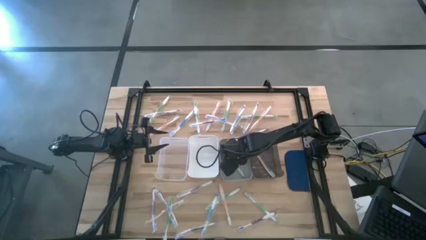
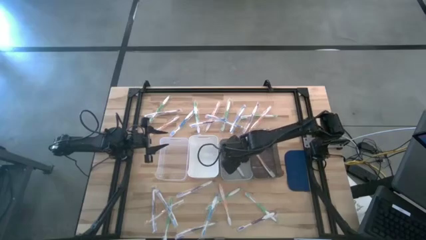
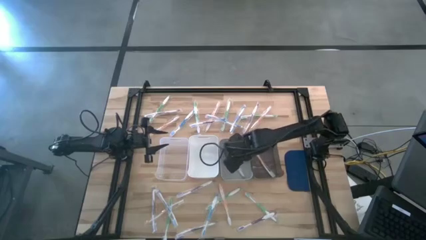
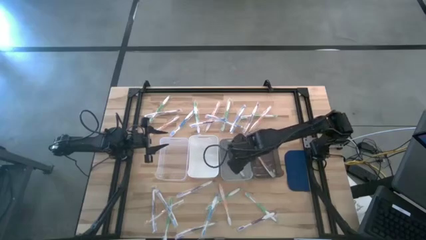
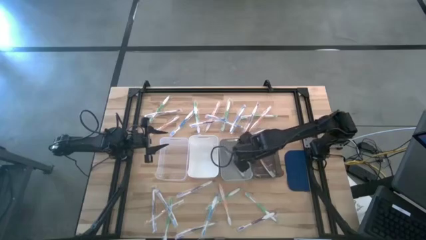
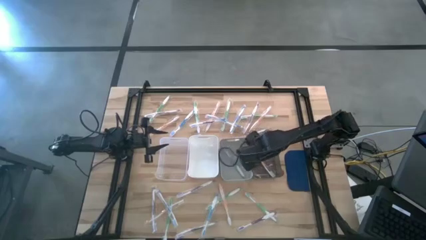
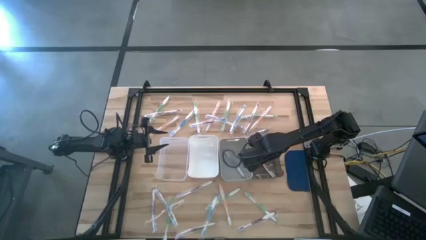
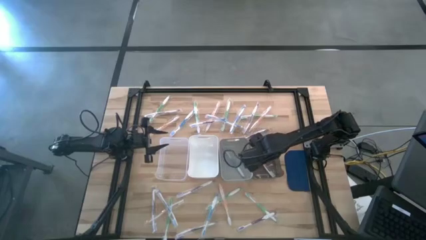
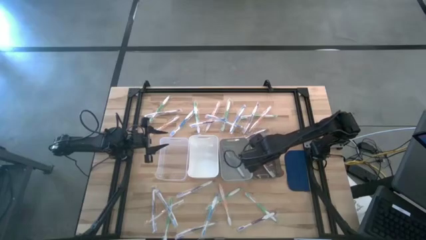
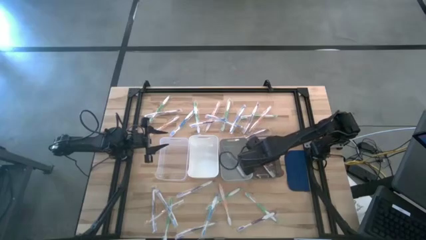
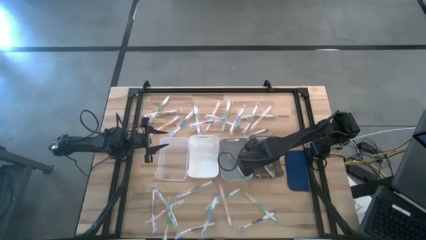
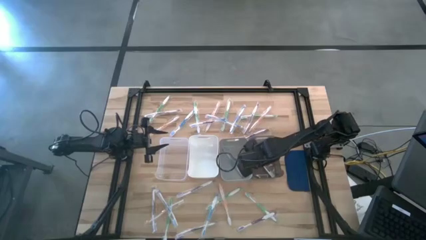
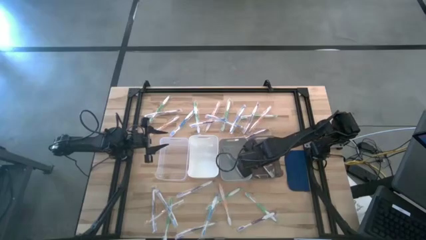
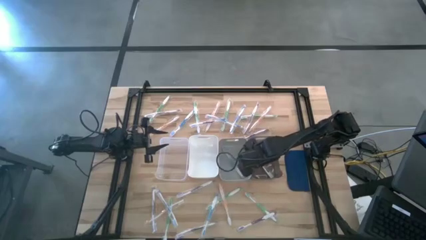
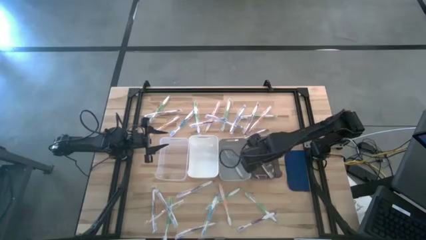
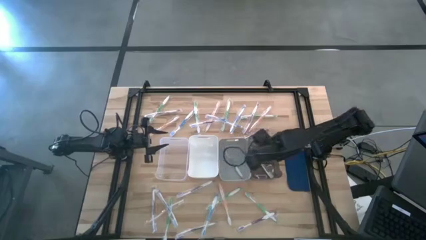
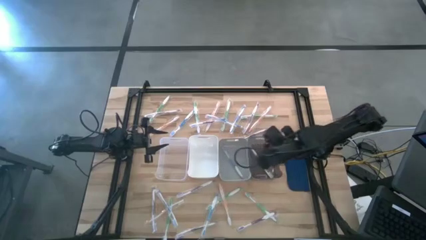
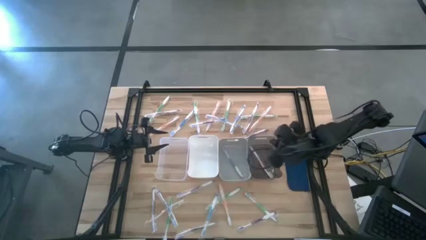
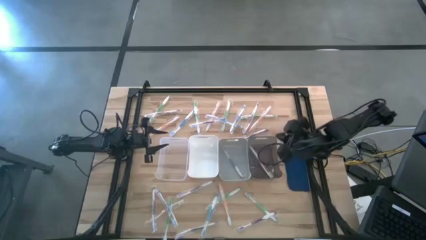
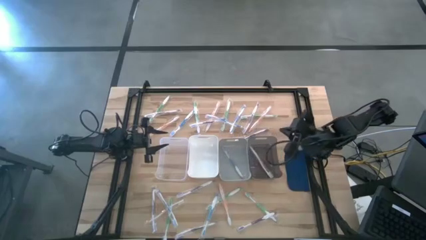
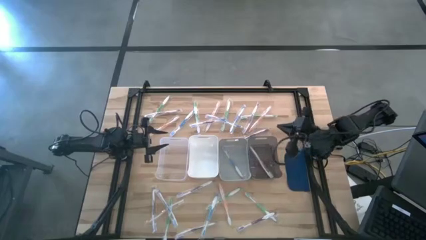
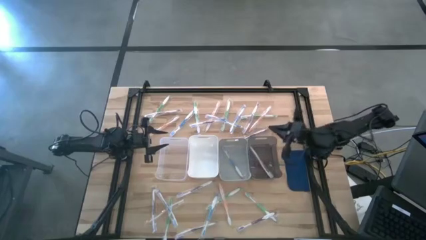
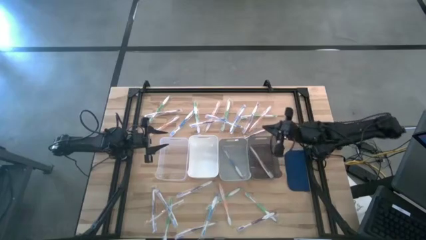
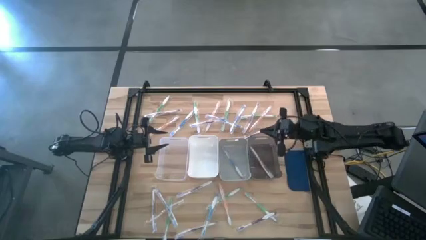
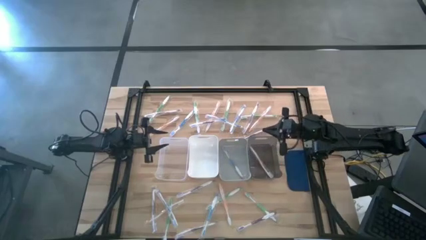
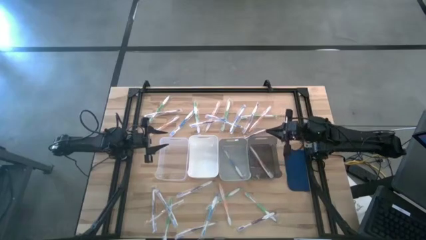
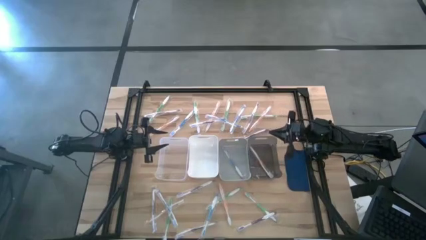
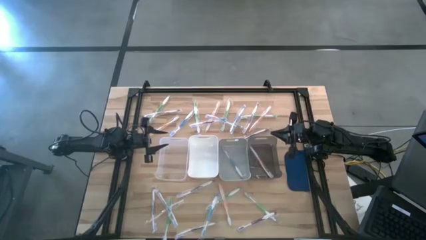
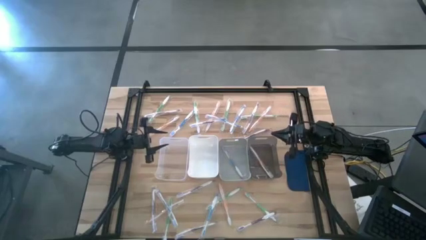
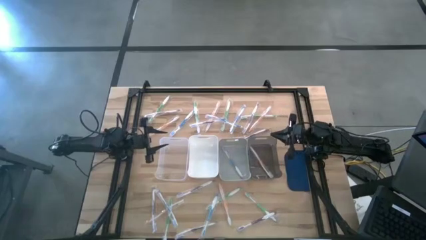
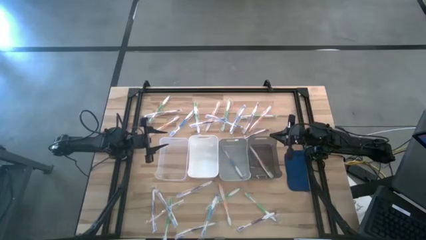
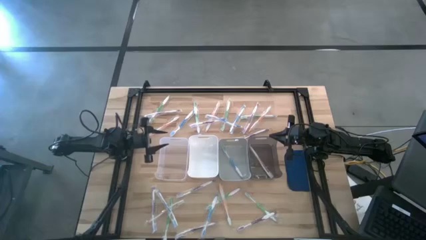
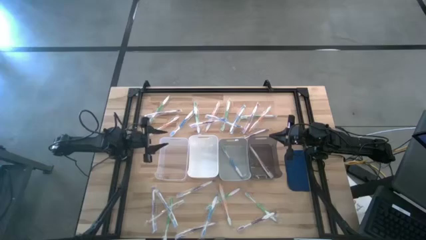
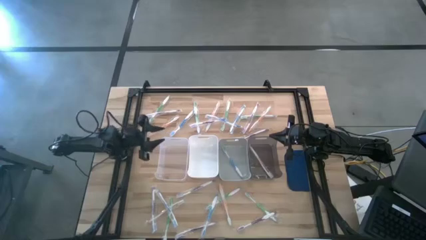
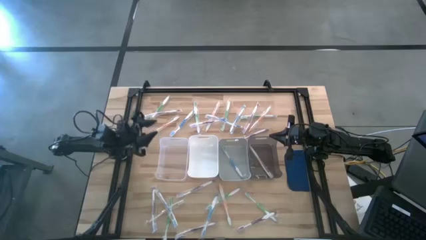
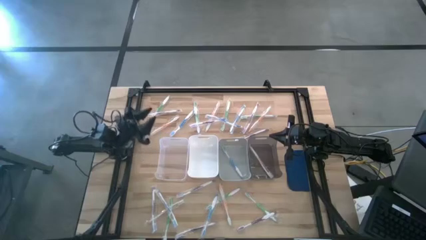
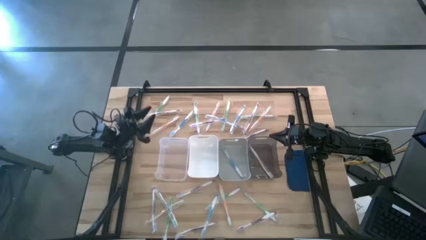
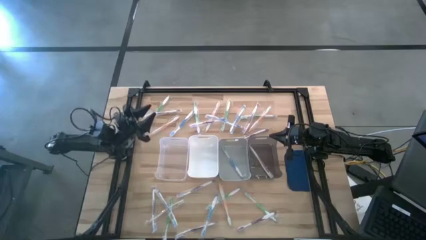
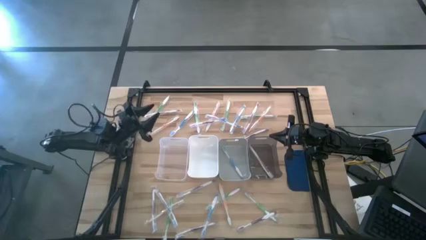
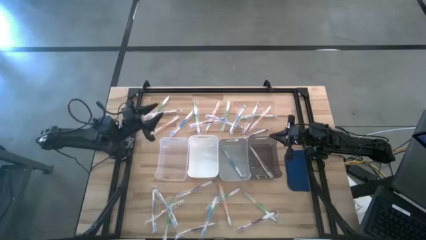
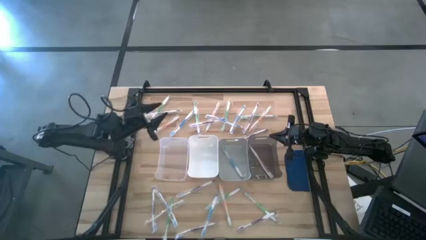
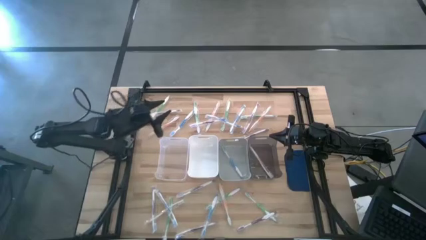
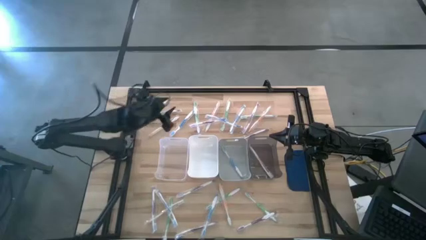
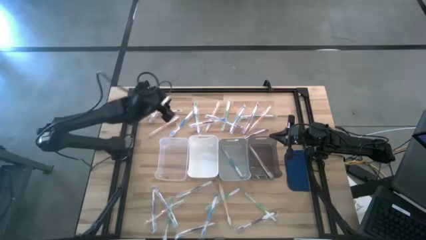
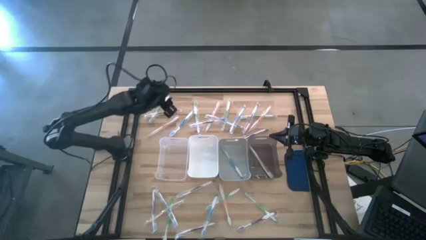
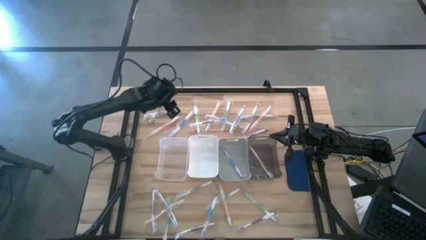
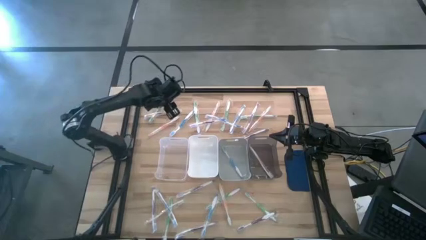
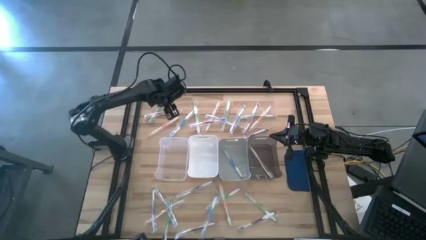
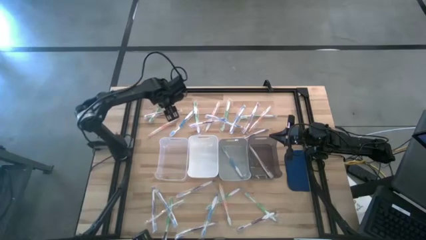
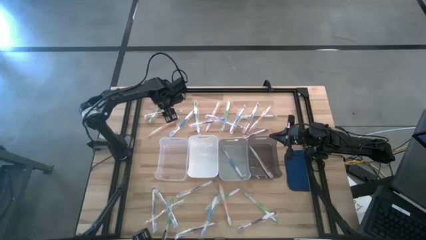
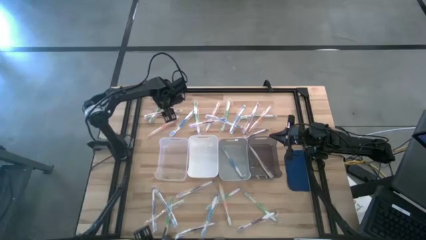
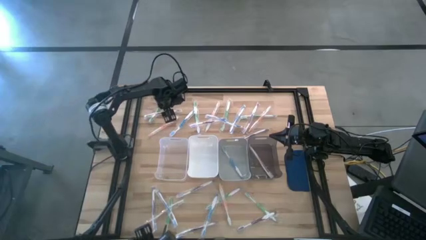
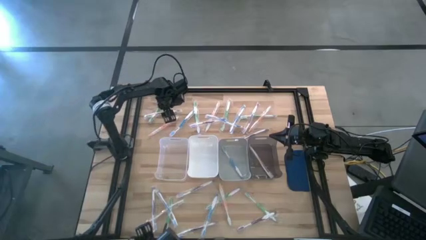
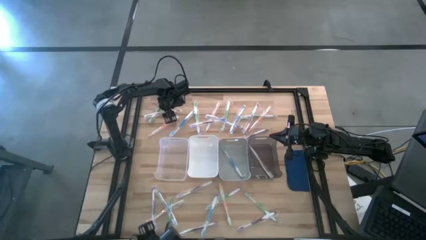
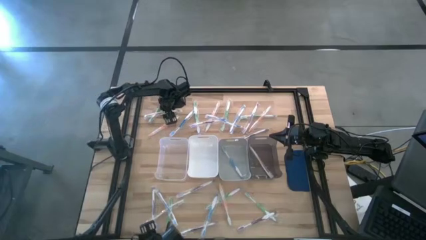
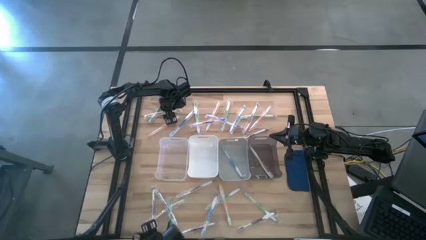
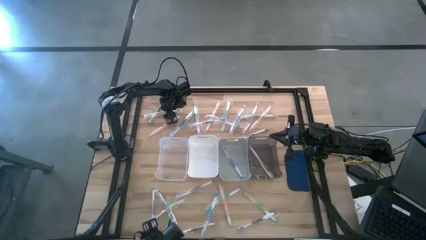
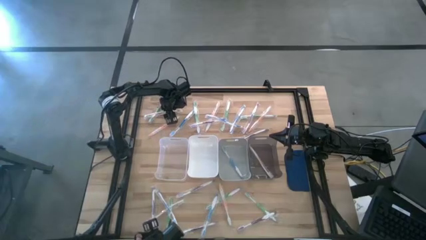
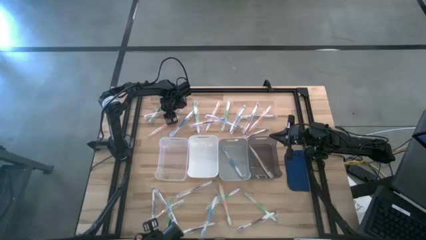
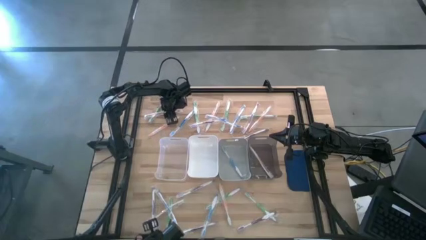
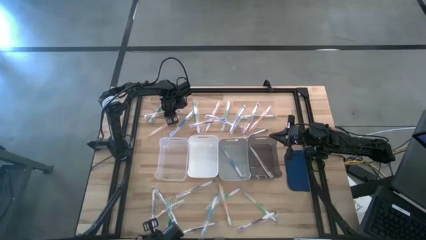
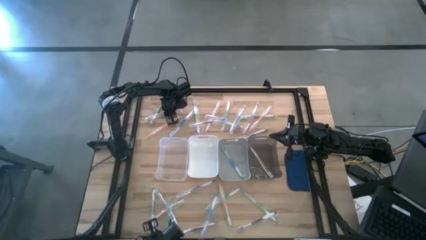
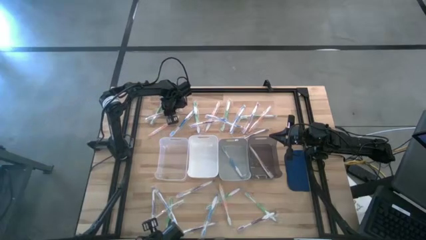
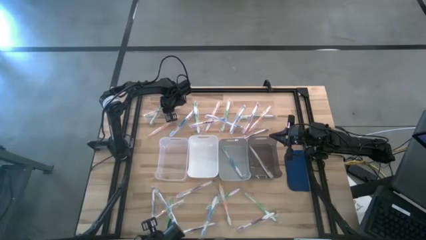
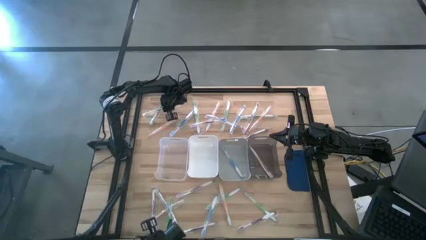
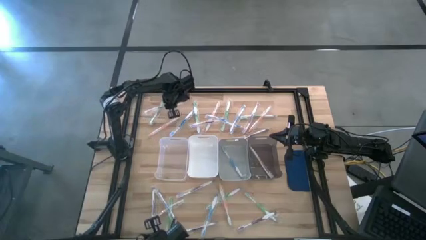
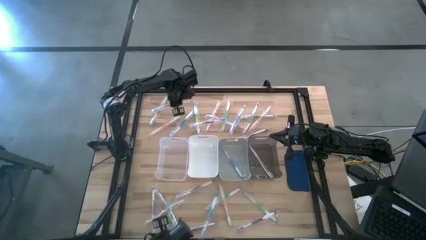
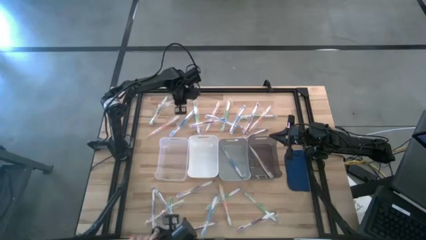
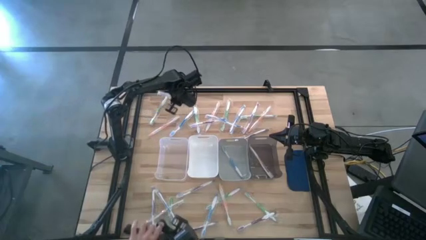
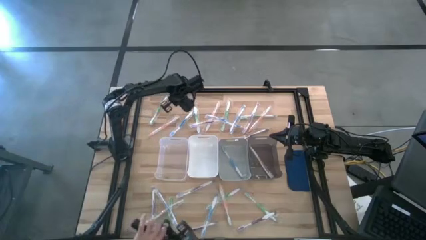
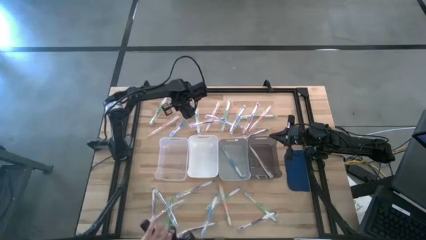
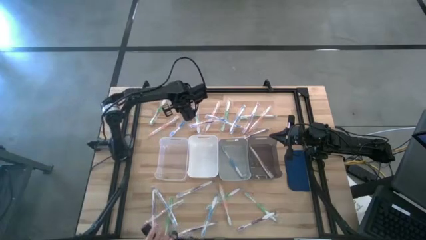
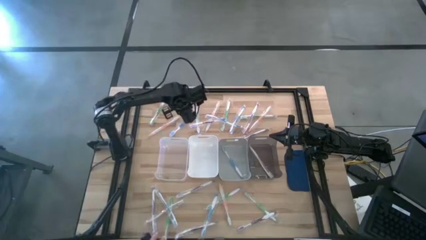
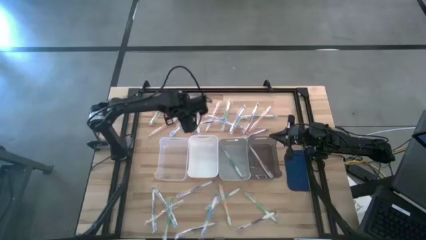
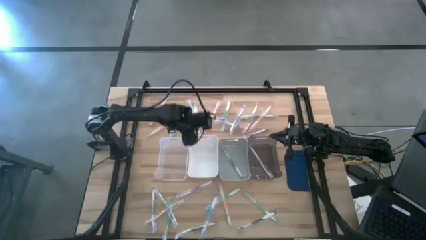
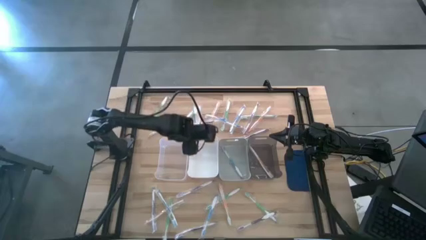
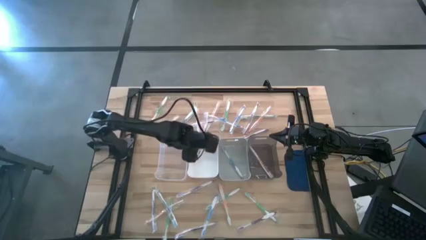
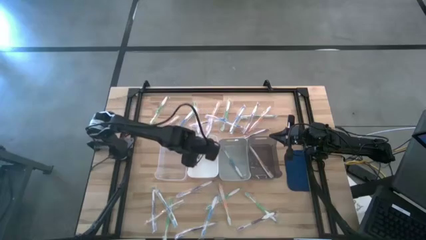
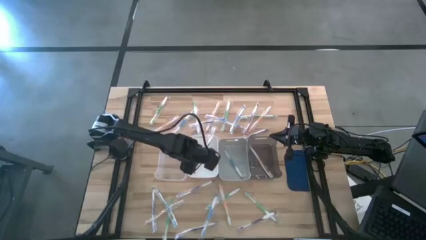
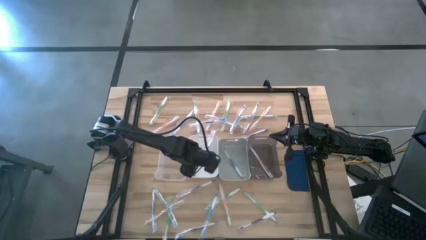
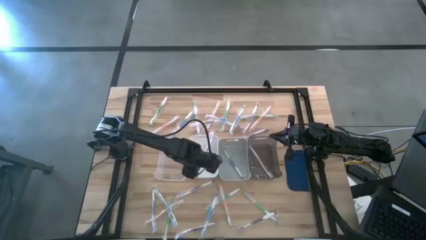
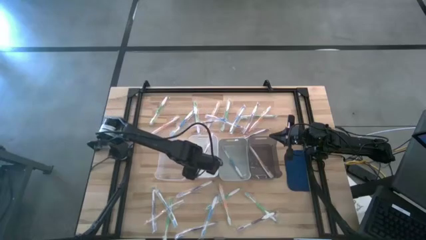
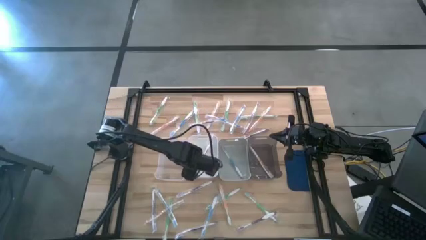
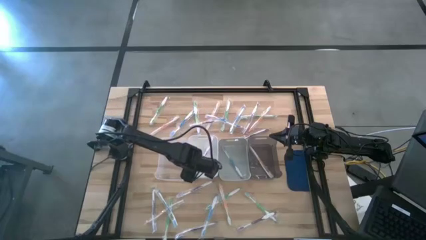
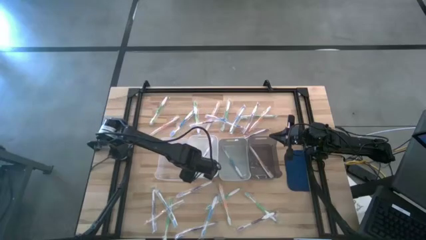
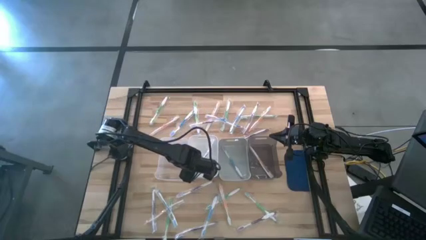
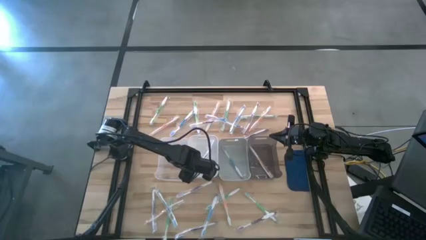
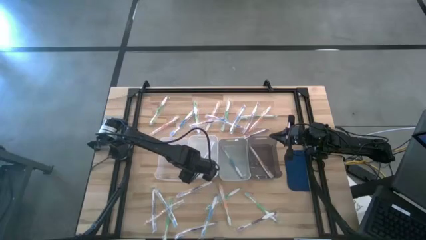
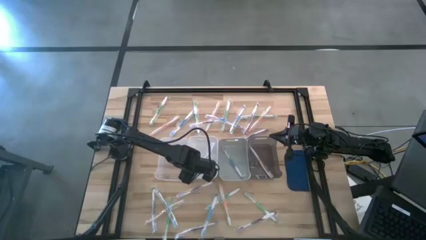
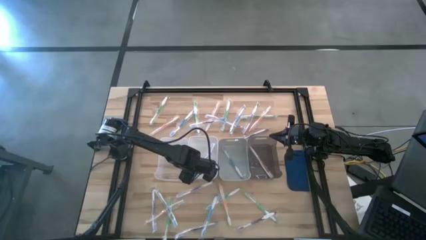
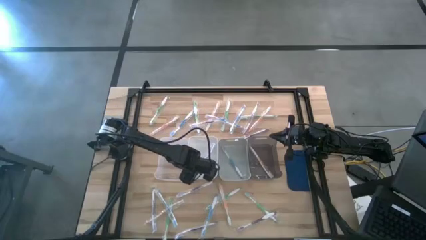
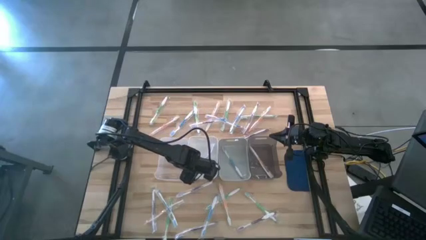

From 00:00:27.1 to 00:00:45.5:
Task: Pick & Place Toothbrushes
Put the purple toothbrush into the white bin
